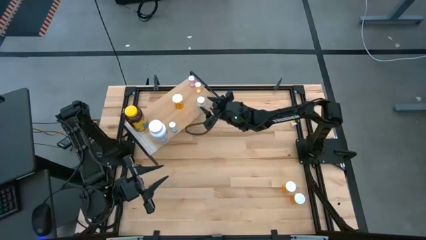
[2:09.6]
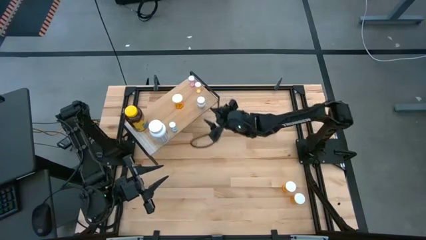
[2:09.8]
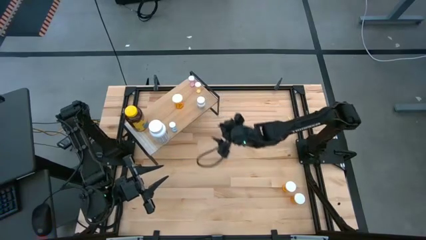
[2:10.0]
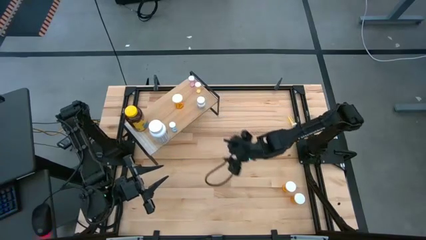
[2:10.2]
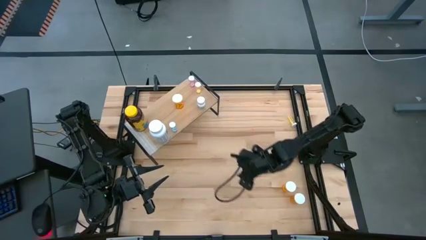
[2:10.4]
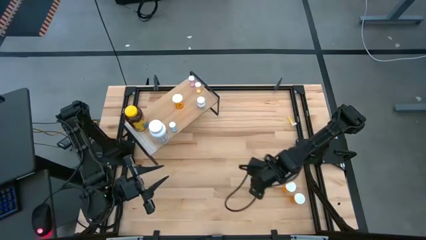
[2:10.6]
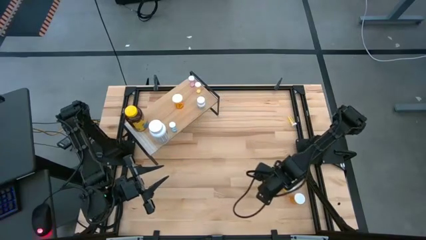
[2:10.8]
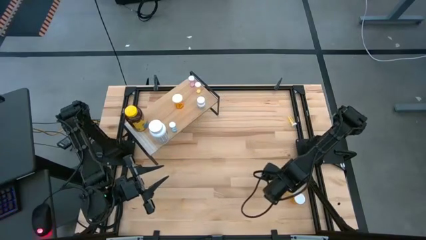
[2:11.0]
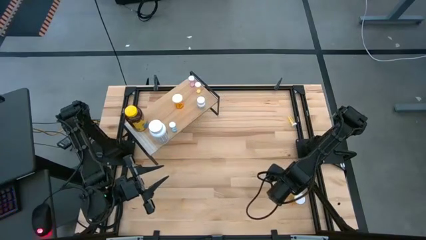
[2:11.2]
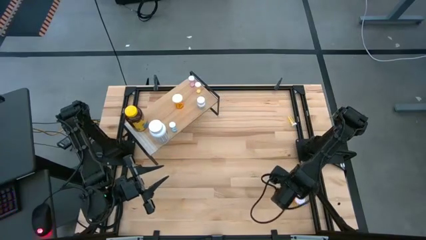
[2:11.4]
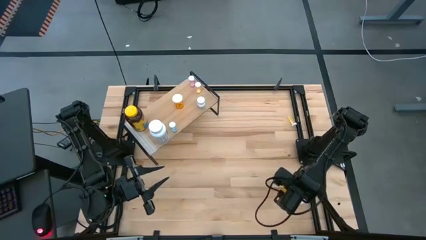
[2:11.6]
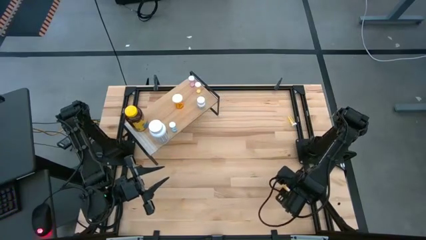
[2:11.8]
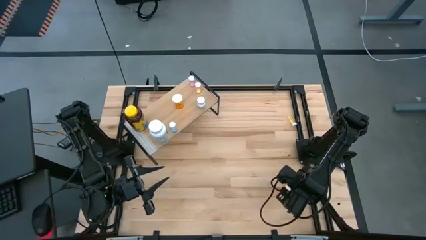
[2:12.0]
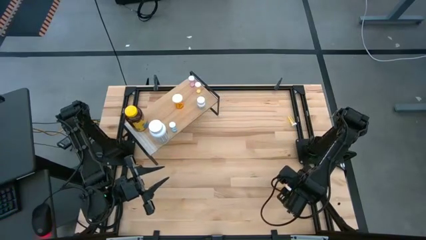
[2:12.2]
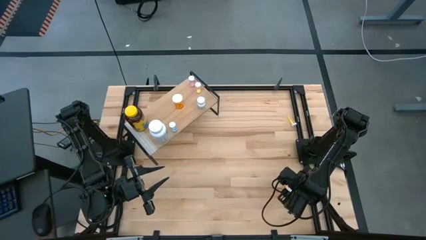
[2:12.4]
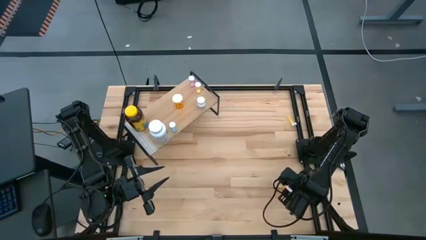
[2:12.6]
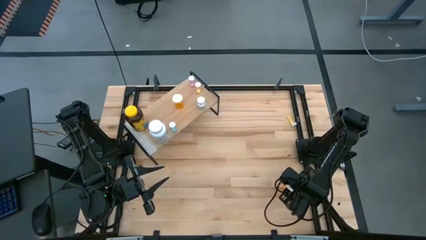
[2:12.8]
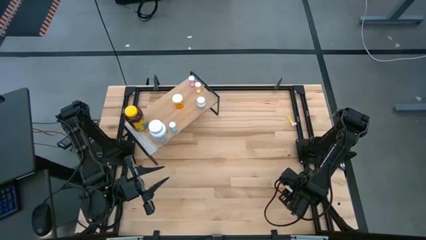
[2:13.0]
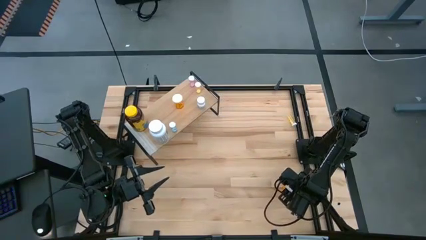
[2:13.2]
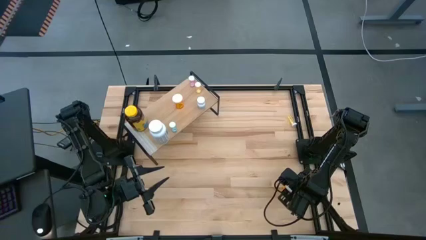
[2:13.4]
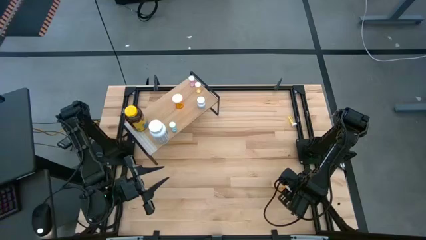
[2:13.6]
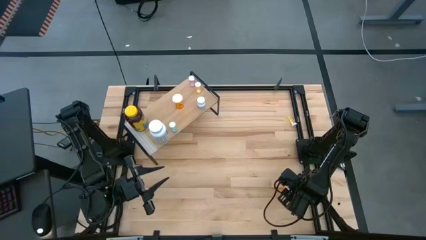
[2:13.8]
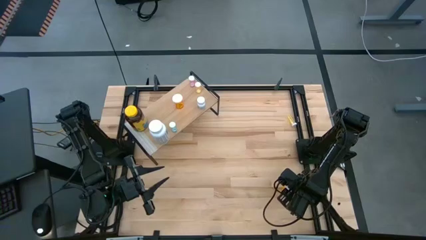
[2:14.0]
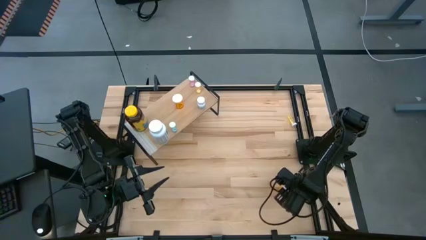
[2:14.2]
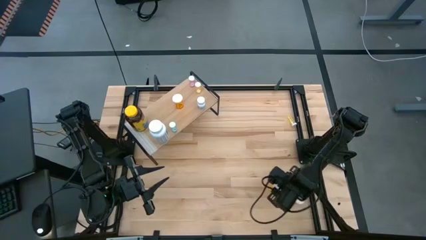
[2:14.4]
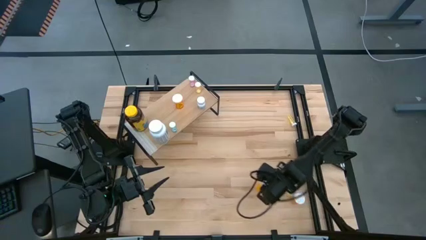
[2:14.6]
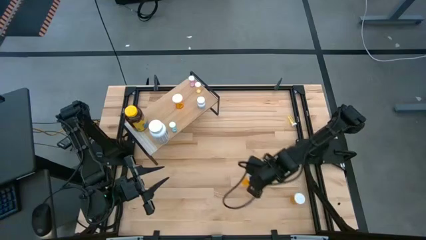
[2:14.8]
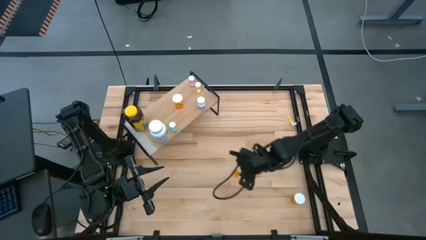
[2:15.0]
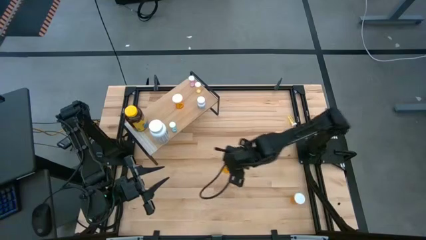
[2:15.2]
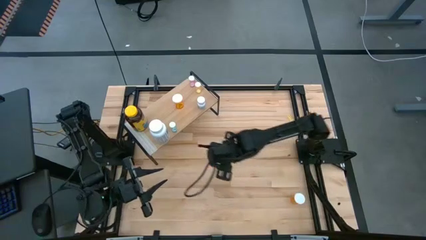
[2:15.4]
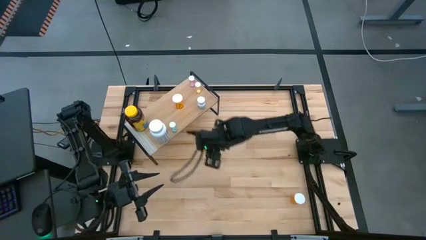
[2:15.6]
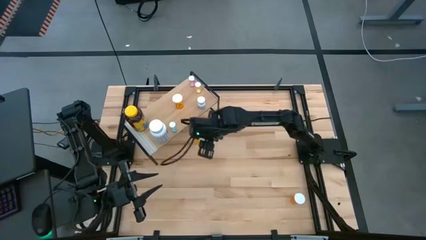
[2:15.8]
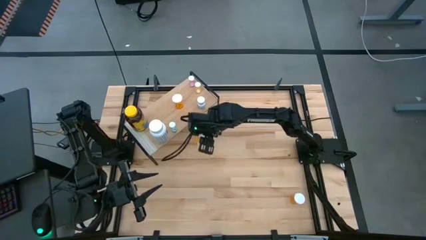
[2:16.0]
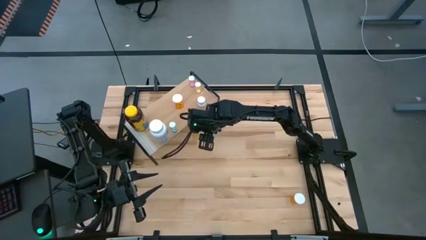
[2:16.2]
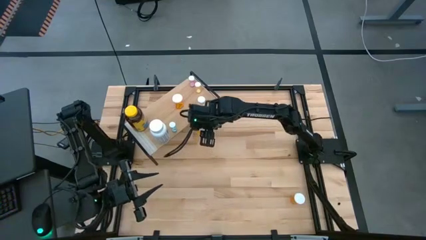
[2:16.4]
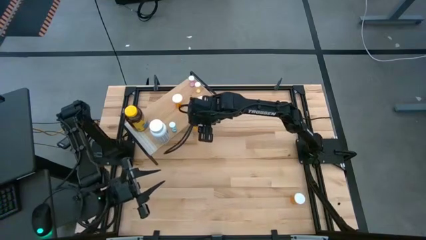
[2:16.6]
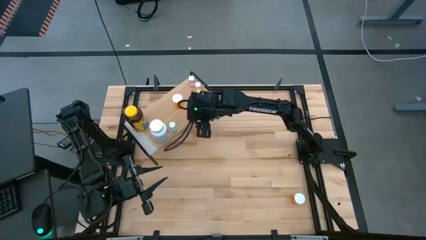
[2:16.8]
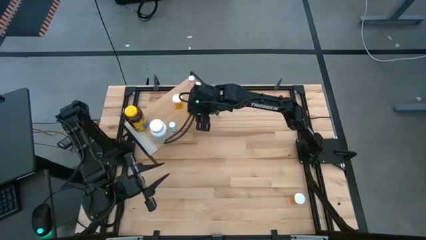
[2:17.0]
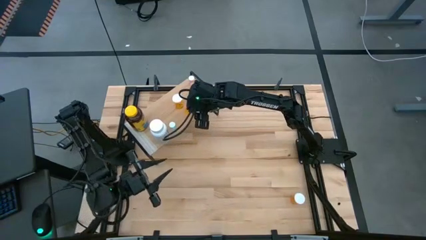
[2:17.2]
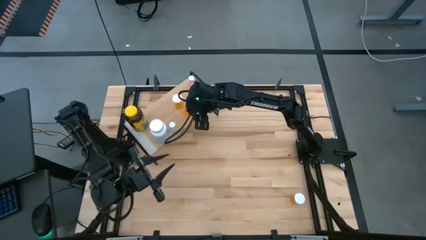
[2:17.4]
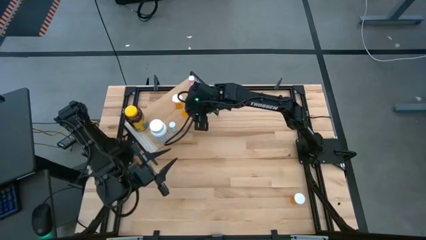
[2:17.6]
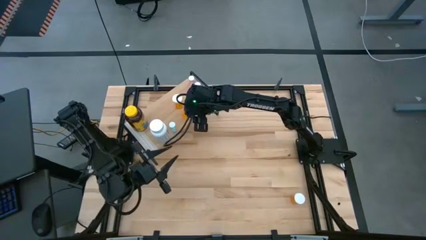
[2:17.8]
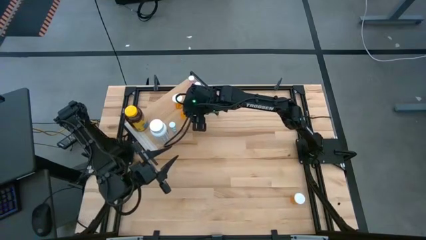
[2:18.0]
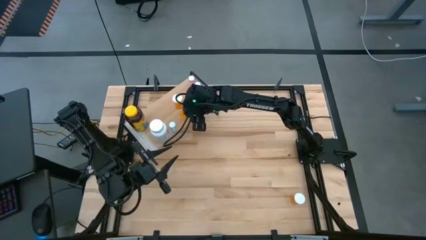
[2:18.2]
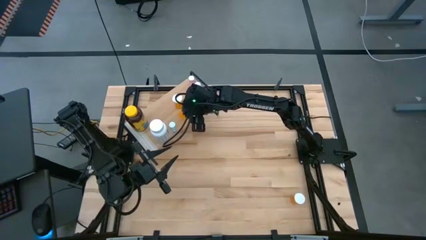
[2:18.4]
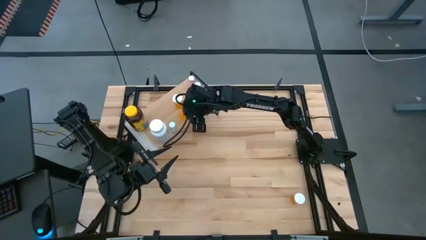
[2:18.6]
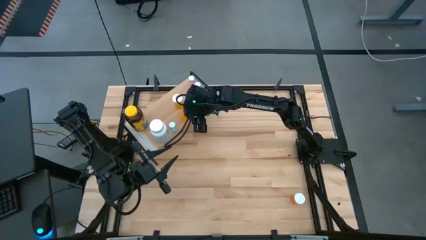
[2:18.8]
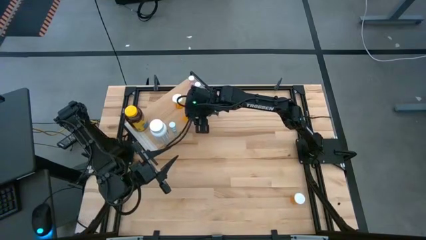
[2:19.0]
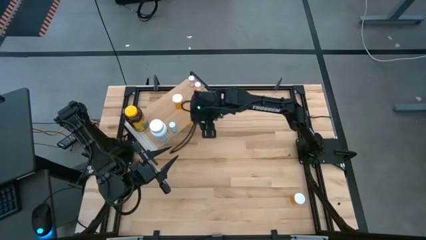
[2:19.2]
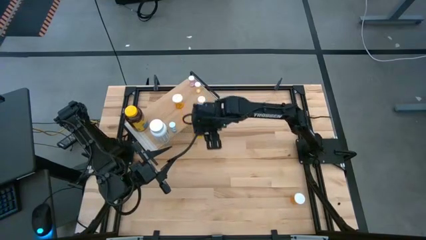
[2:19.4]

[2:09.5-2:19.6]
Task: Pick and place medicine bottles onto shelf by color
Put the top orange pill bottle on the shelf
